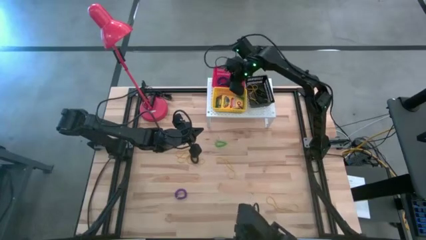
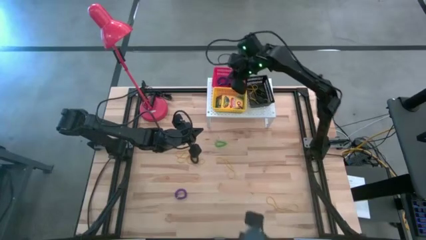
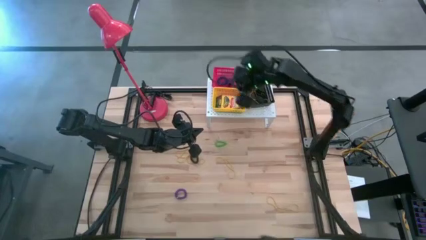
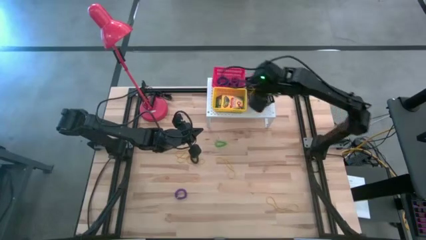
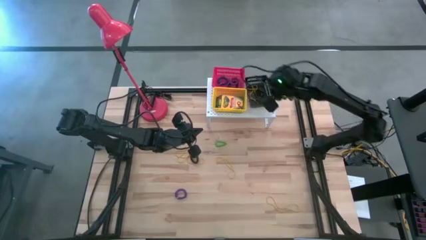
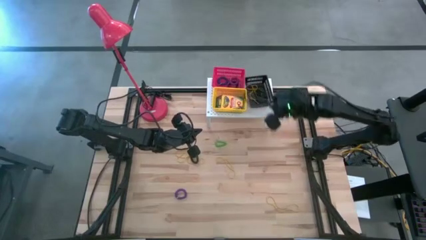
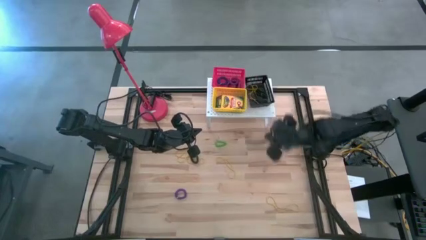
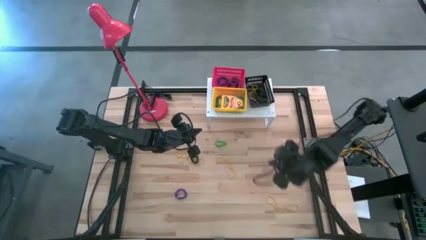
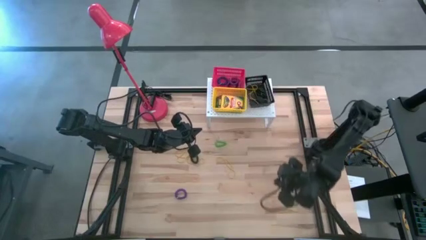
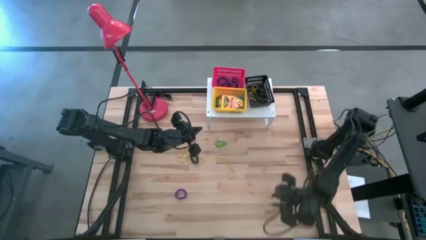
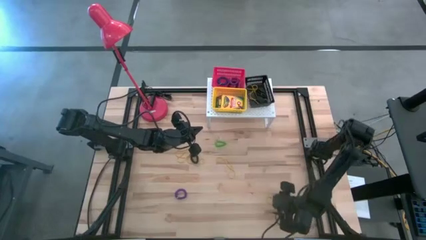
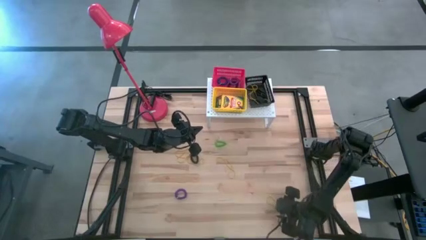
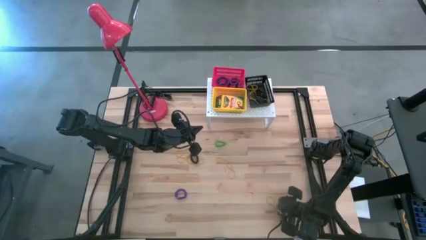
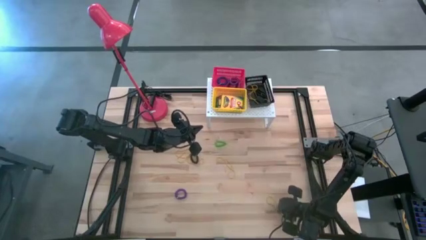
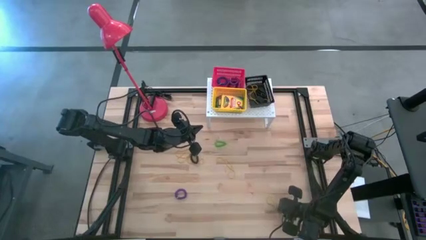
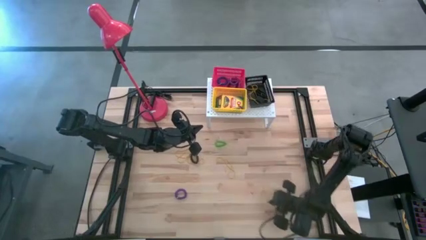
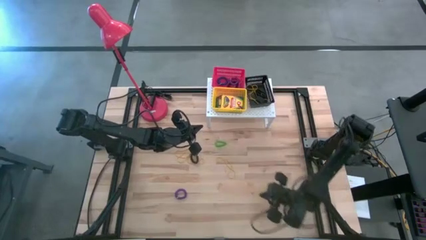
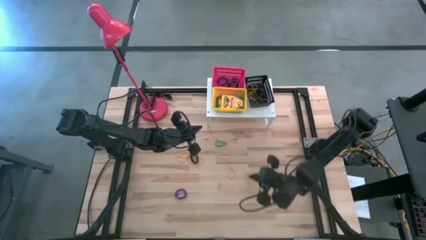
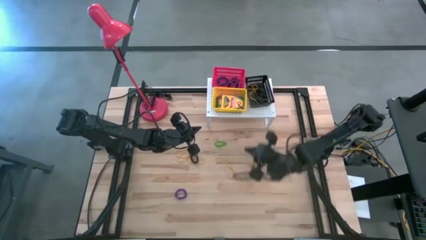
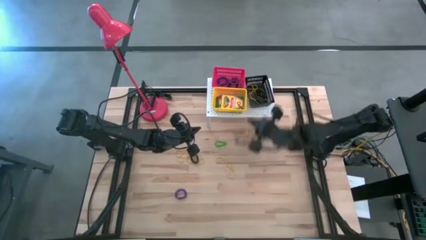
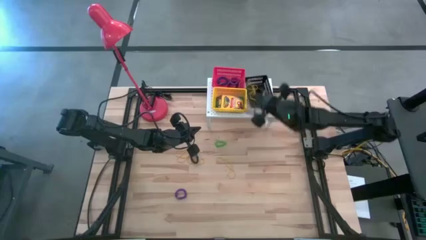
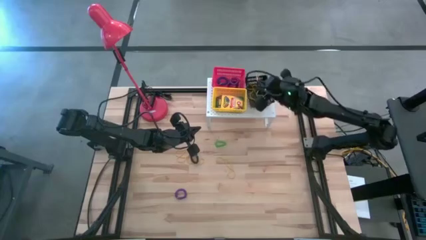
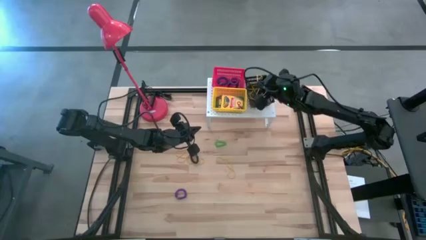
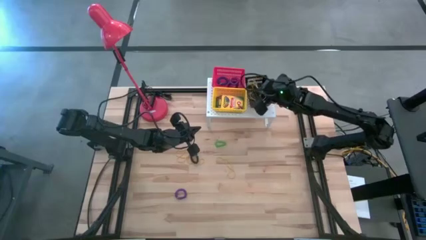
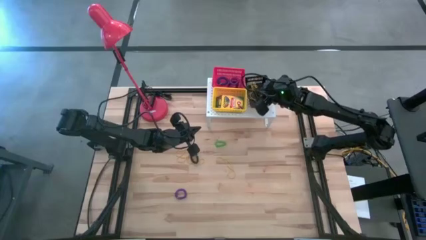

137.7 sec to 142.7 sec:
Task: Pick & Place Office Desk Supplies
Put the yellow rubber band into the black bin on the shelf

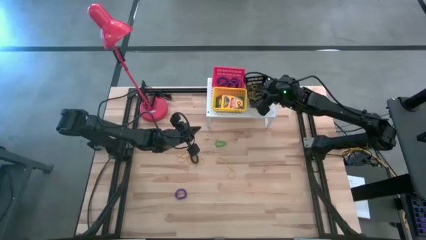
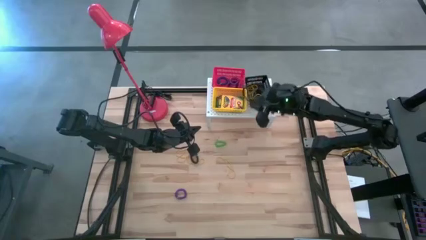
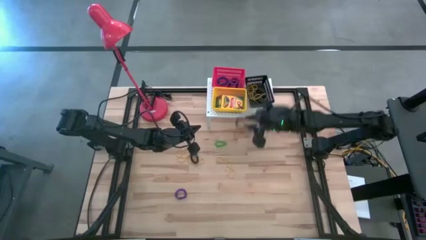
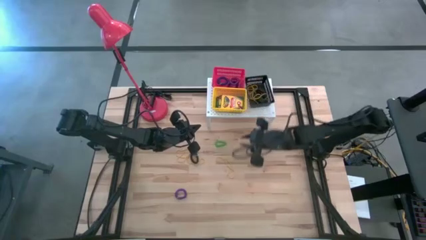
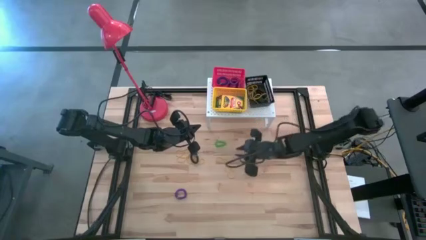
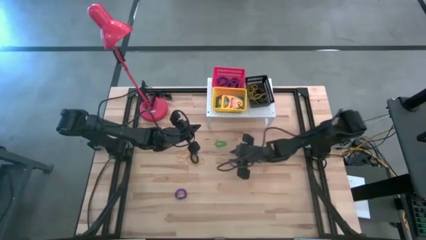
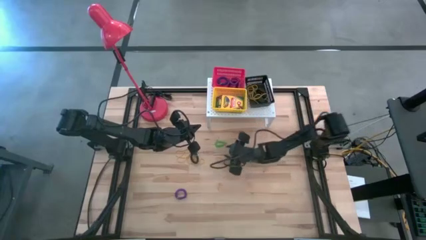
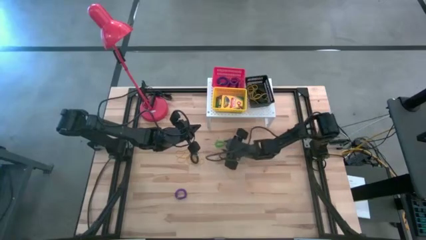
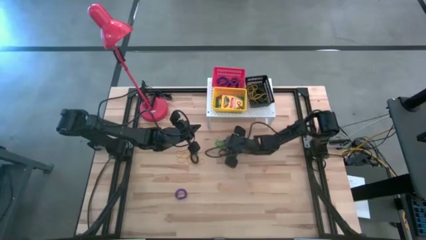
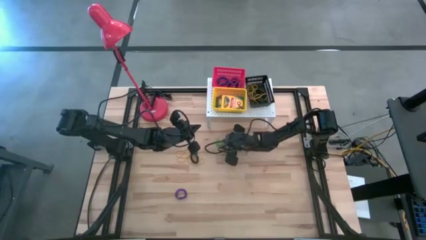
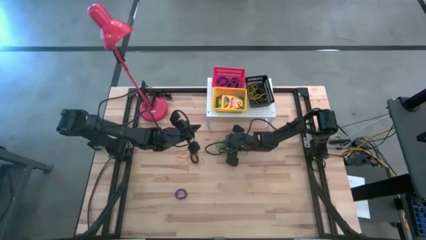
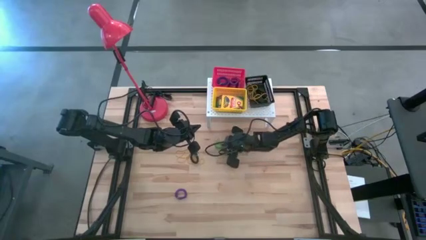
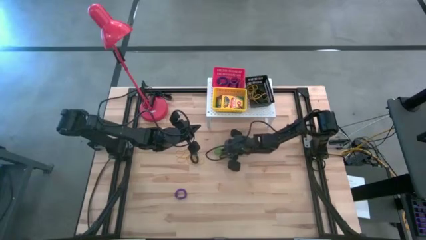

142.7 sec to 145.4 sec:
Put the green spring keychain into the red bin on the shelf

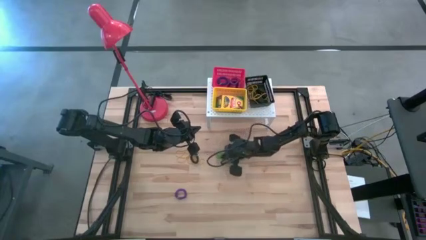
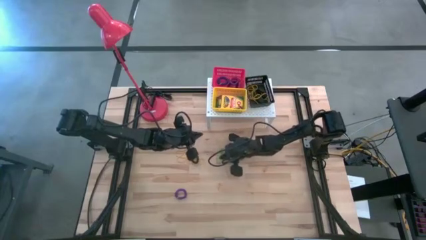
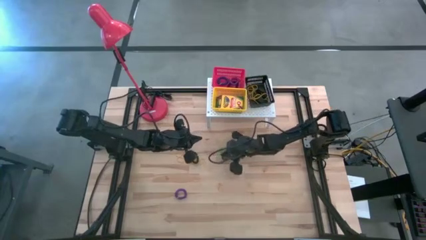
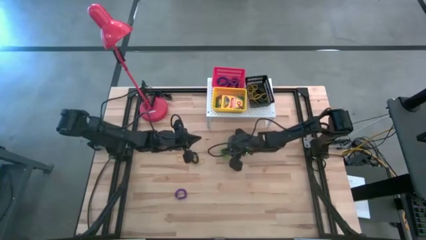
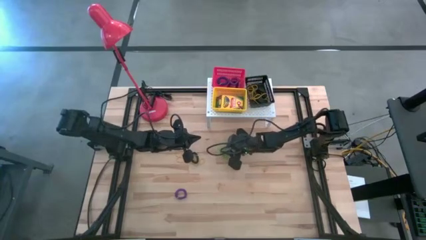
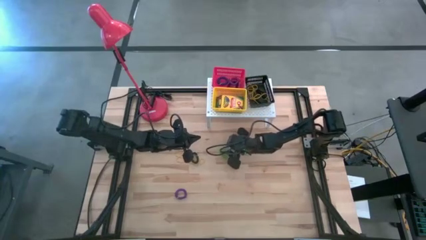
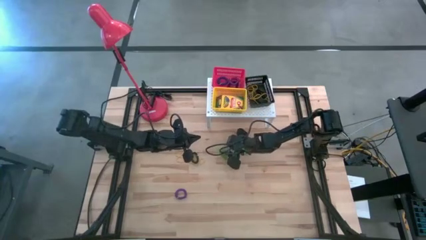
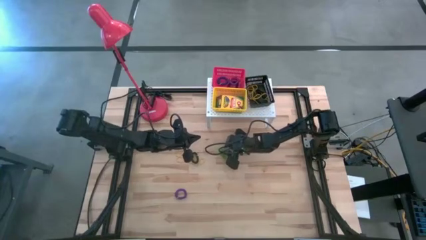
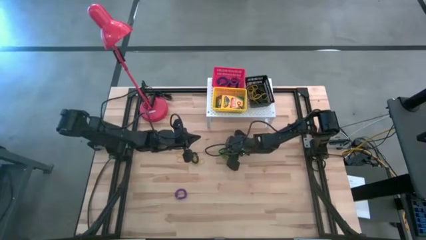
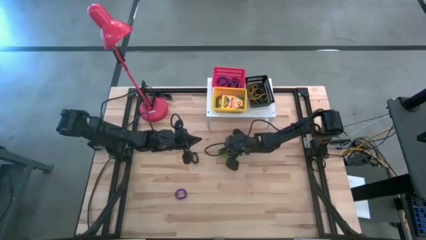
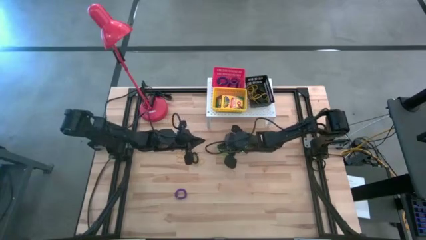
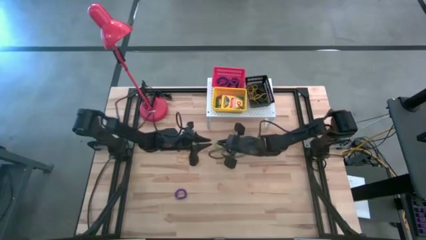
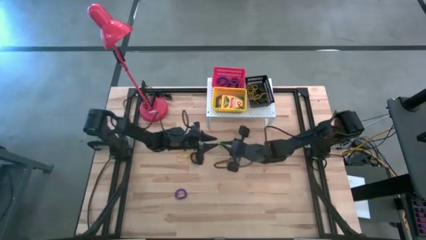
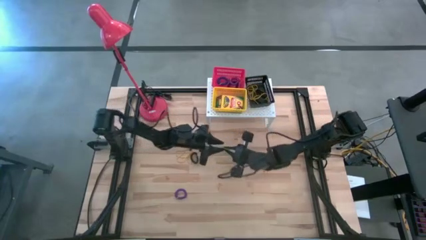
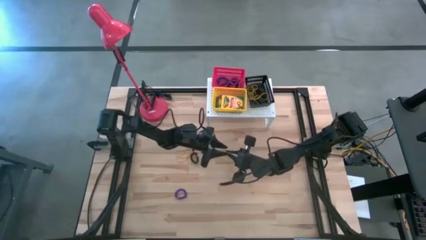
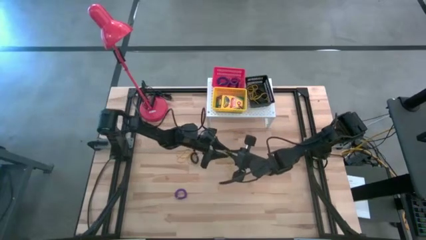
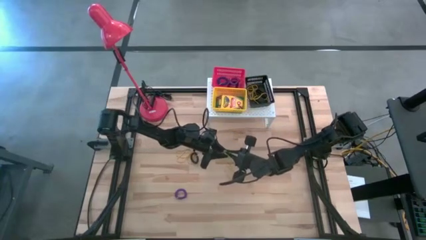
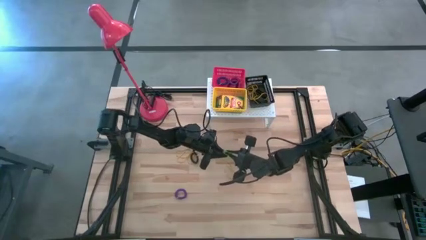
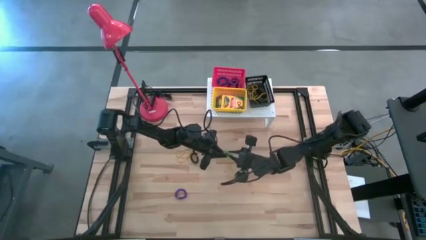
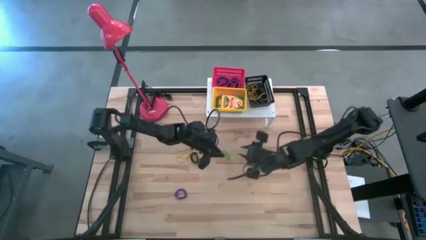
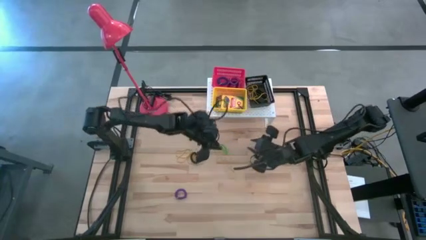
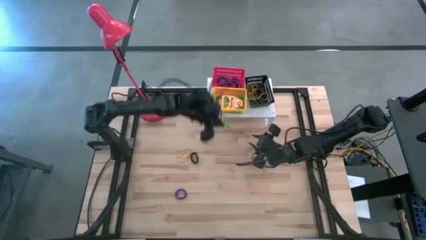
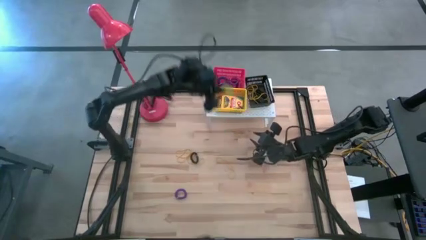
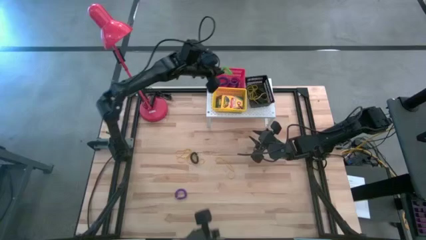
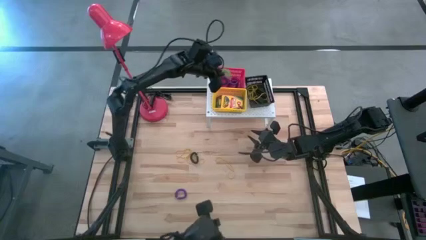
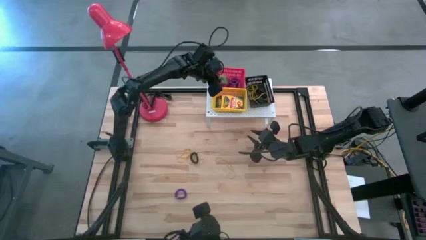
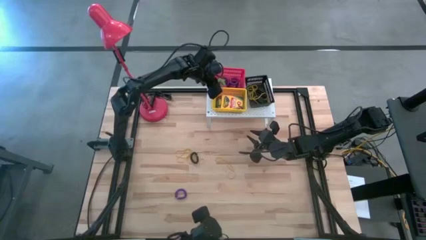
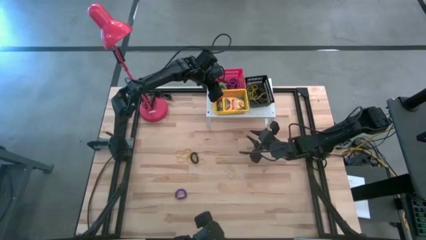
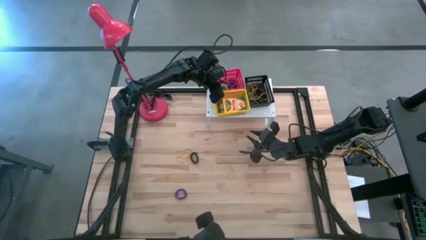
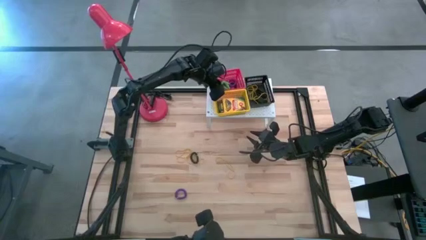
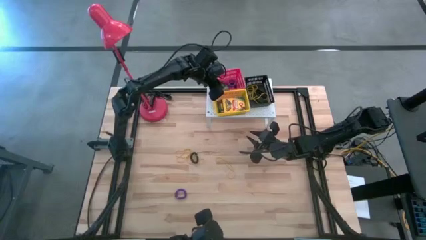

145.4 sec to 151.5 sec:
Put the green spring keychain into the red bin on the shelf

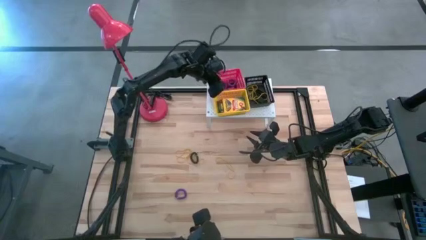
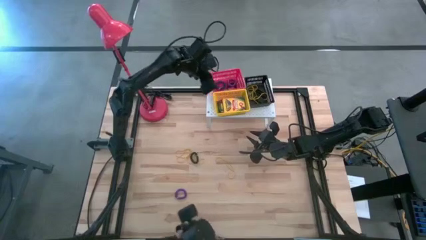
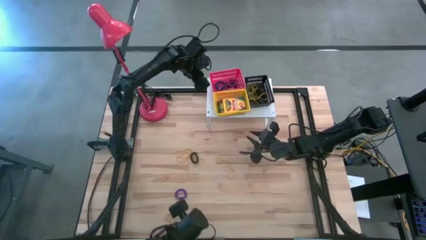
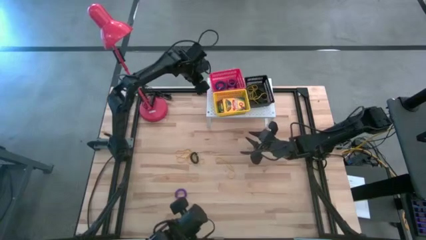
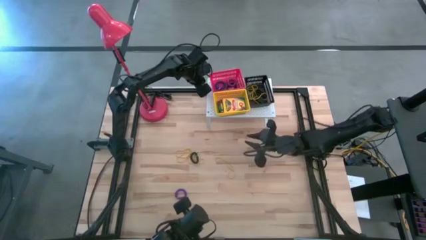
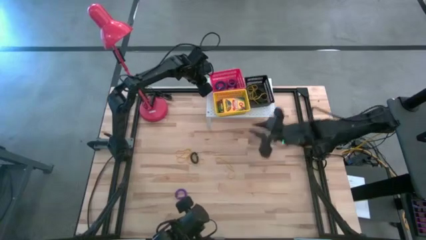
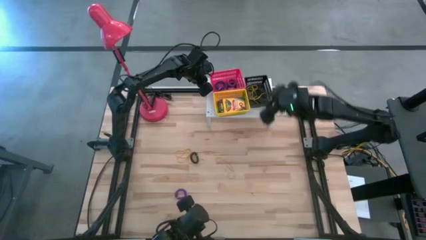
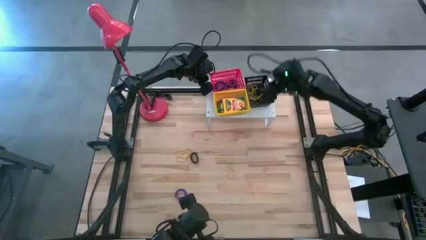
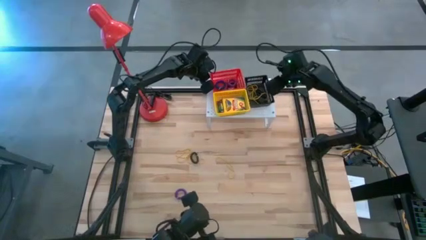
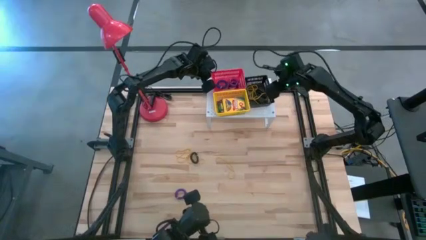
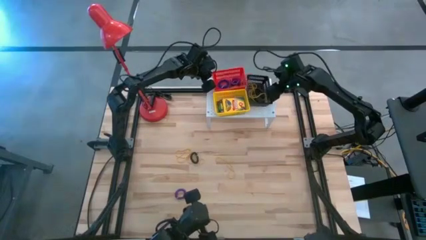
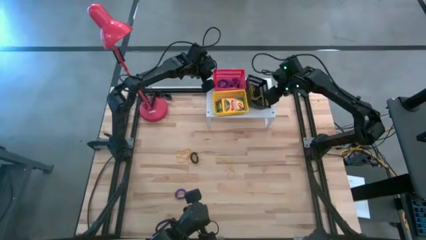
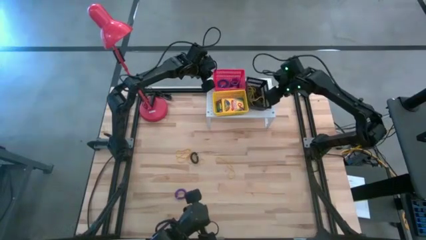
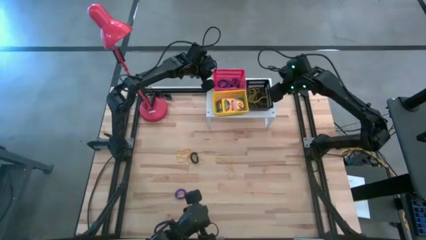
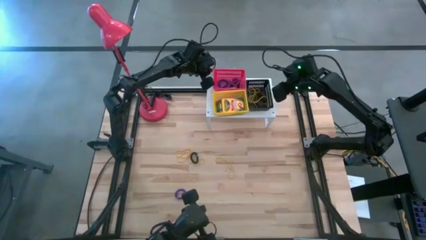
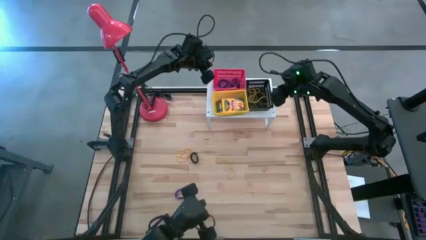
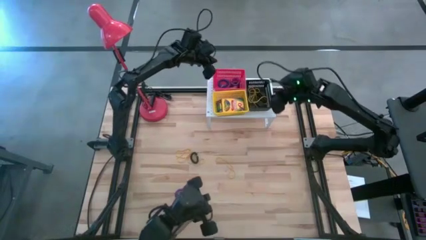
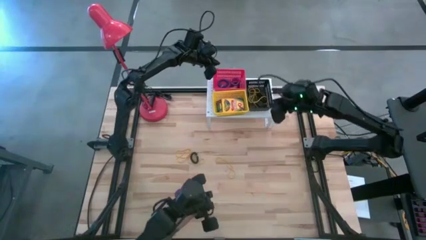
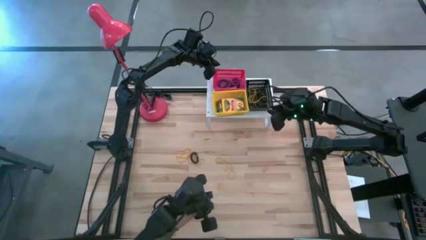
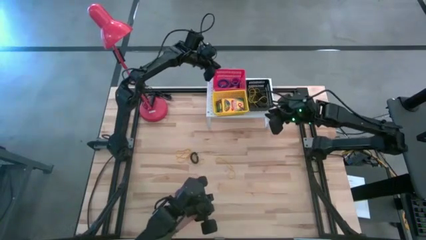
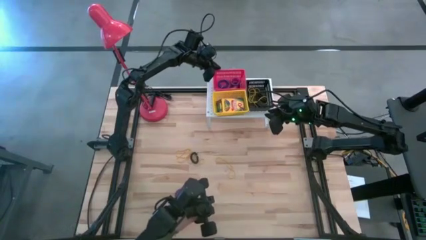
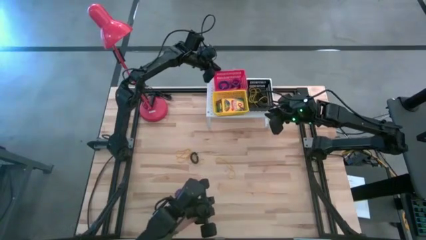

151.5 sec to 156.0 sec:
Adjust the bins on the shelf
